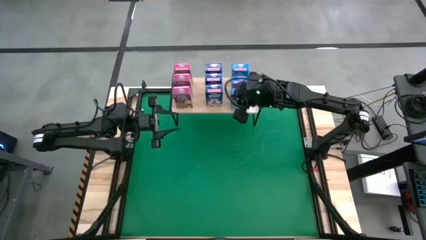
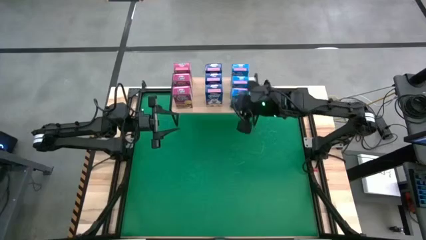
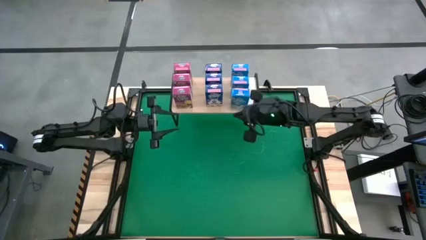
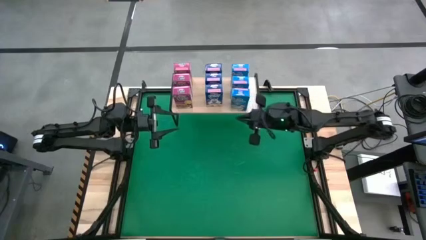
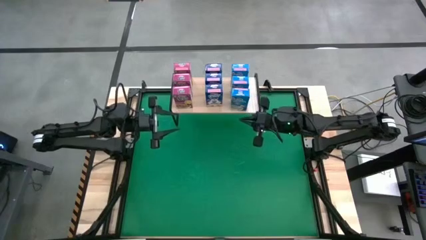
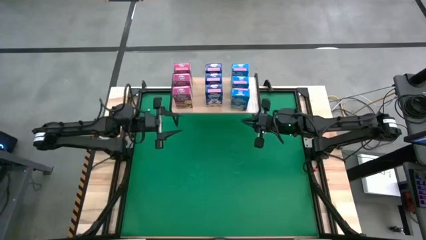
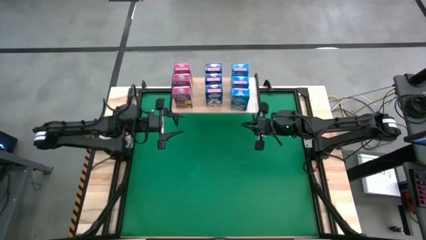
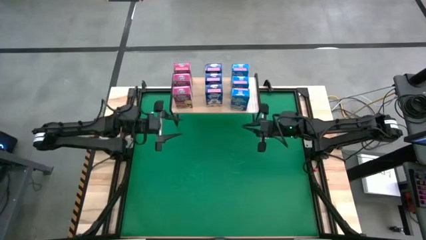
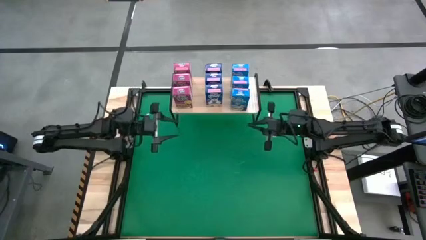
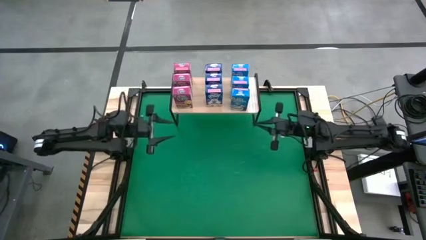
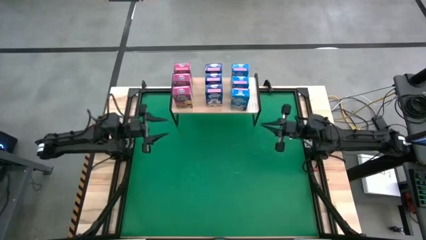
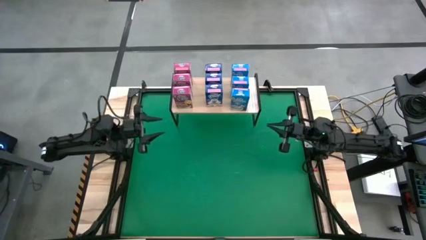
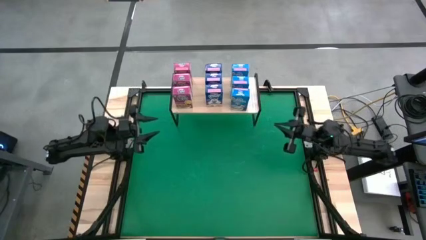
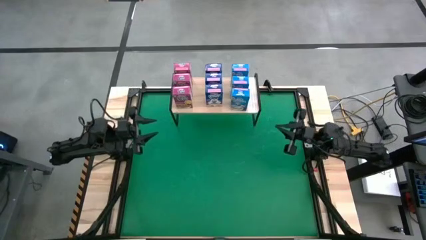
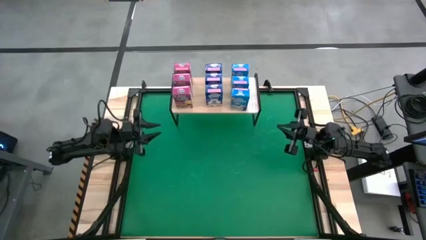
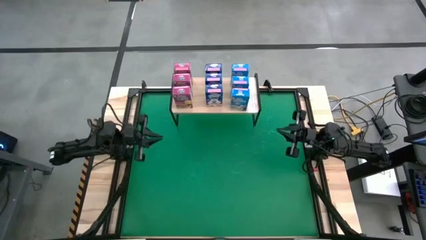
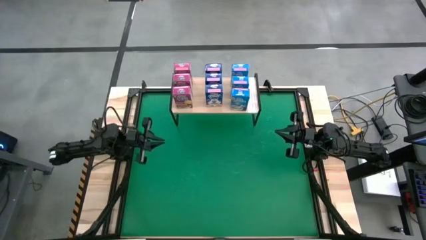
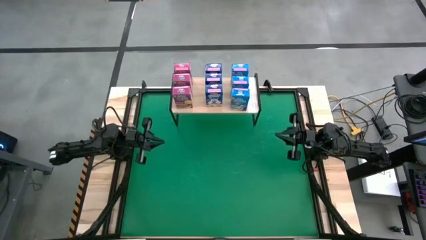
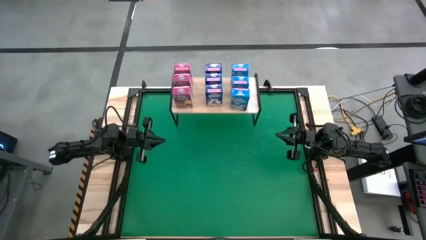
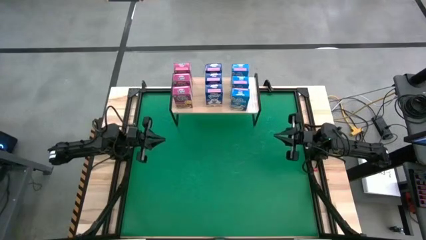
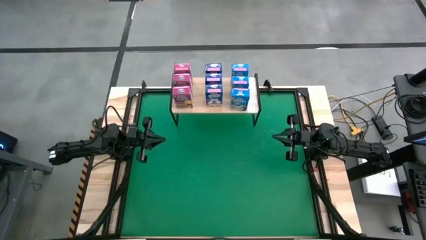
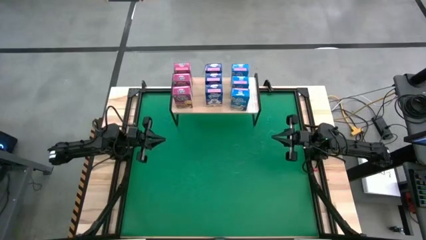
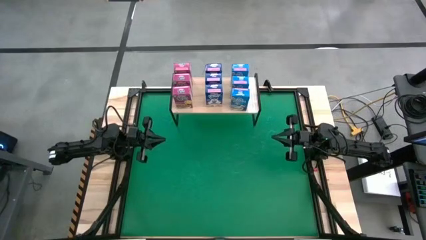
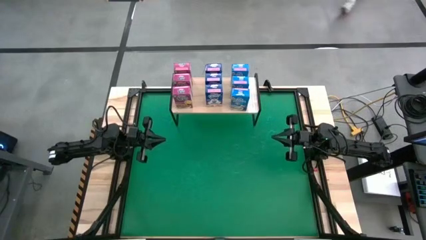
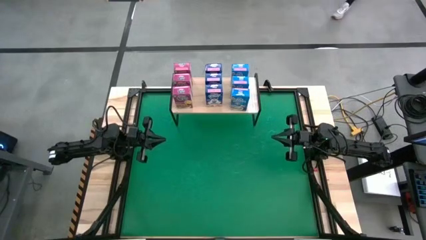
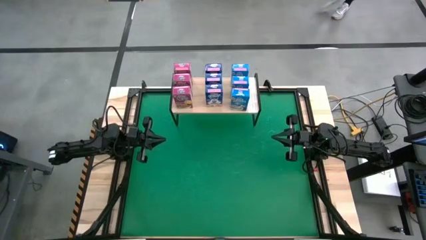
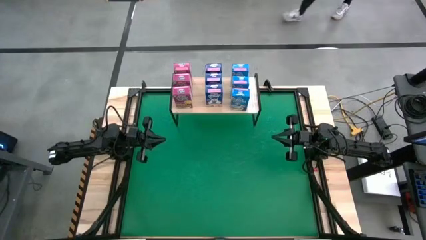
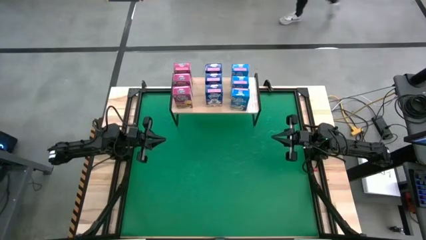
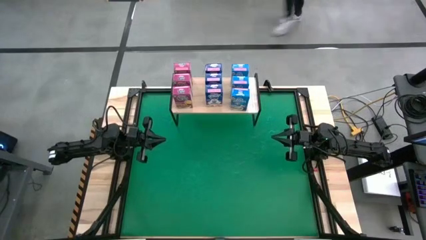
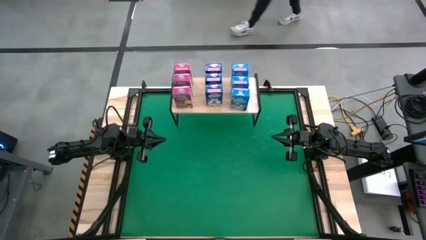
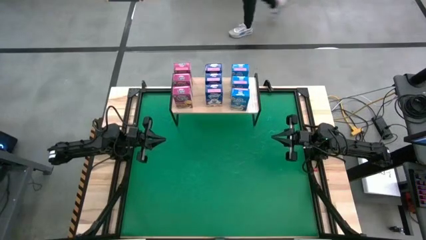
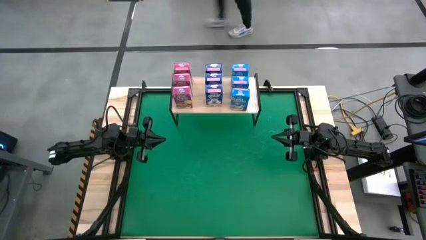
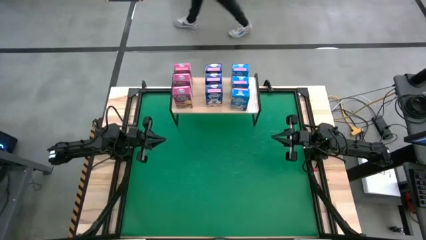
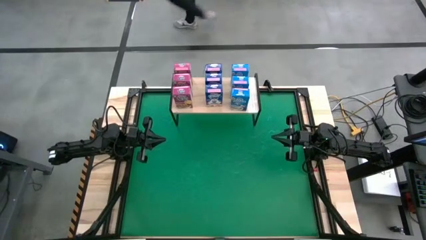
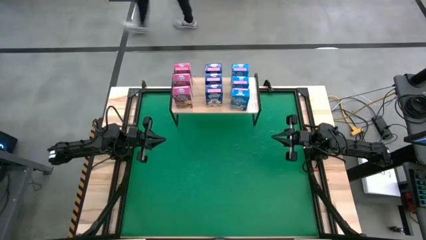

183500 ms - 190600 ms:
Task: Stack cereal on shelf
Return to Home Position

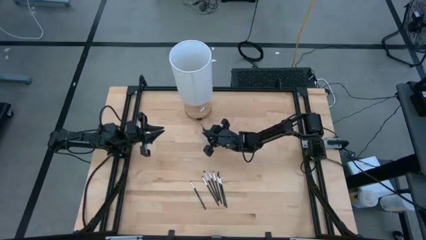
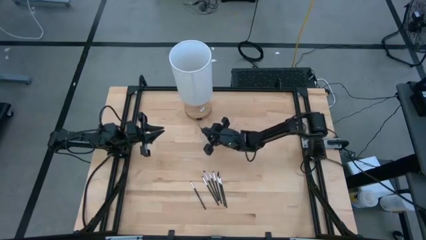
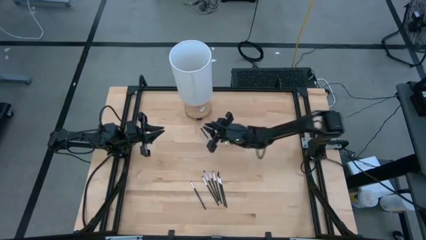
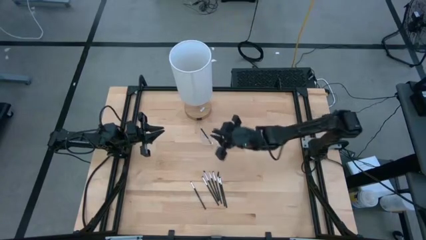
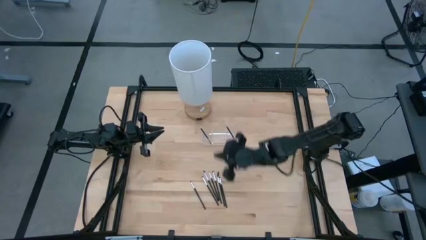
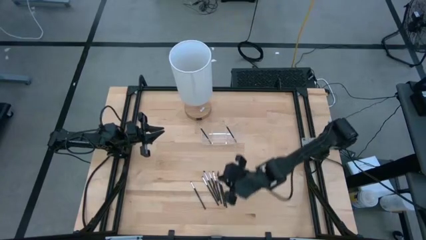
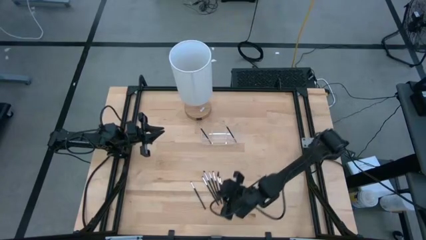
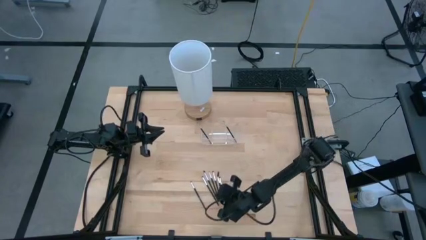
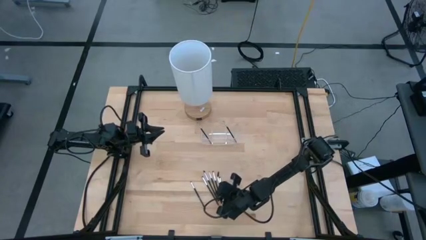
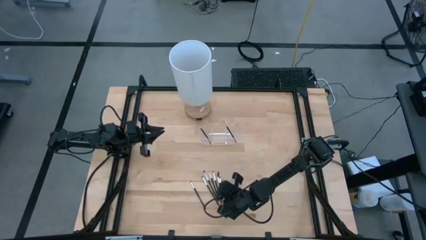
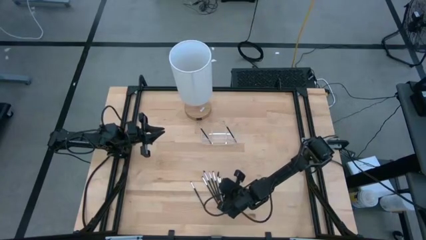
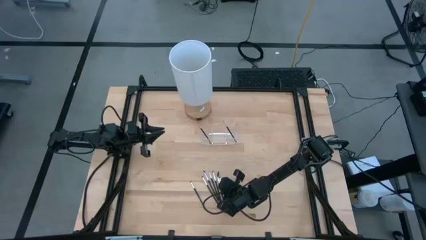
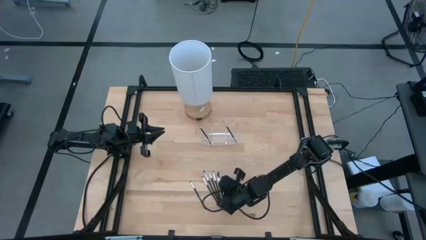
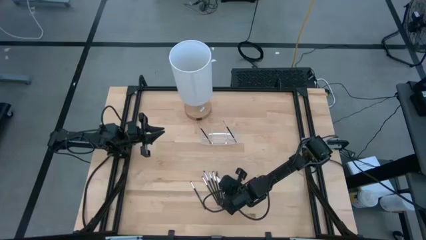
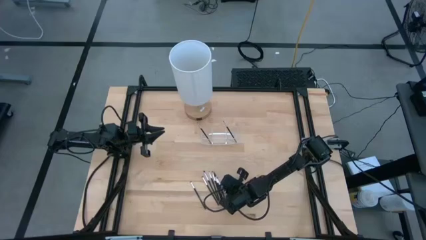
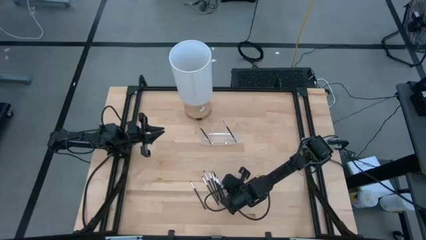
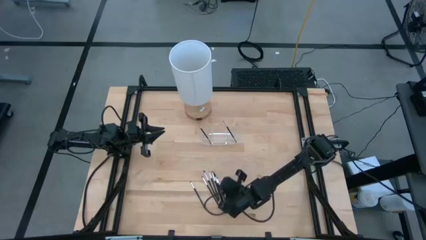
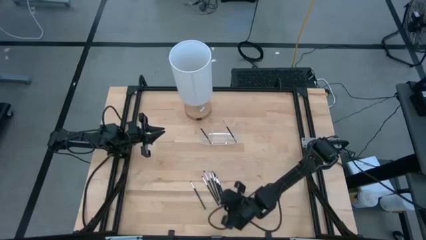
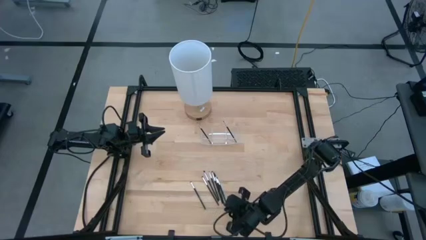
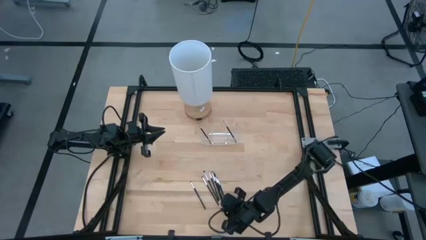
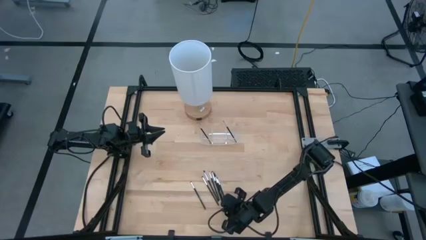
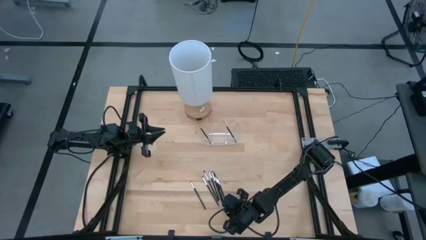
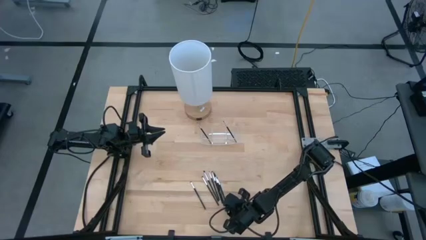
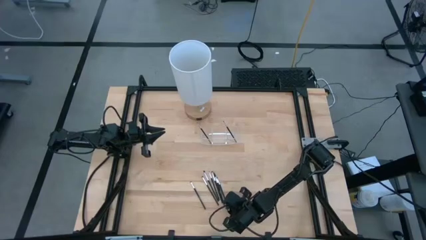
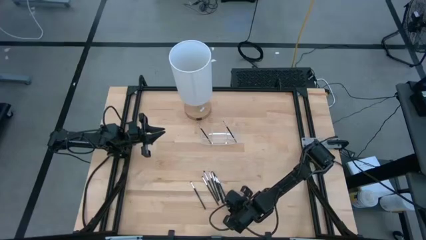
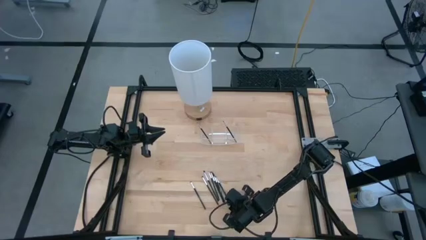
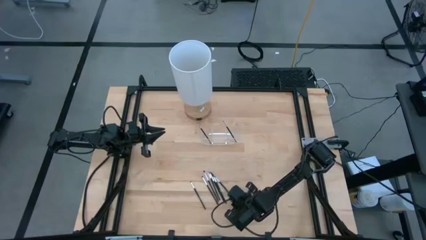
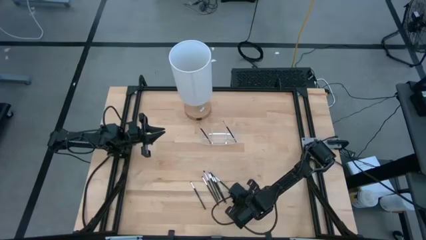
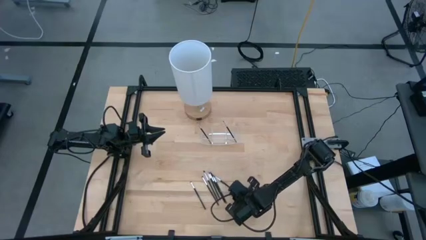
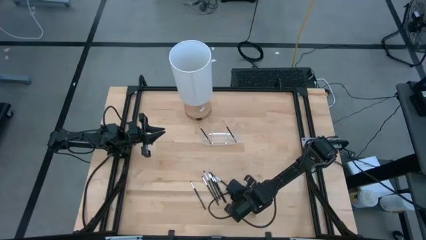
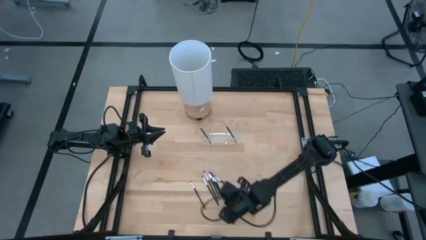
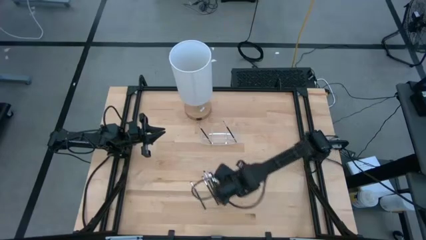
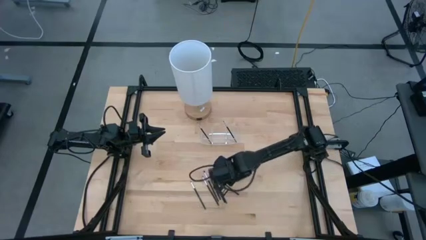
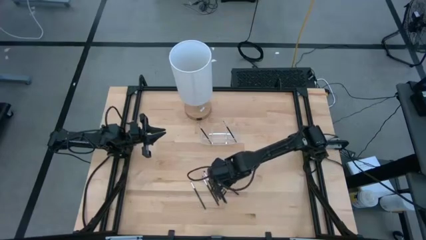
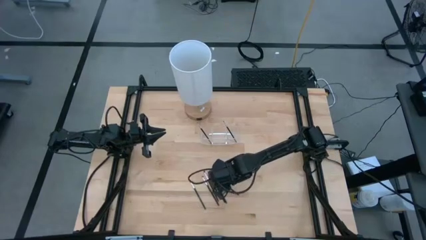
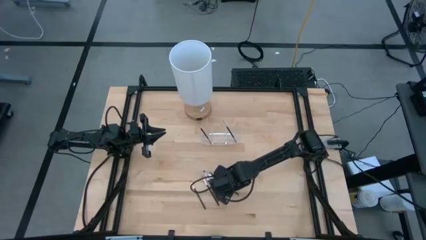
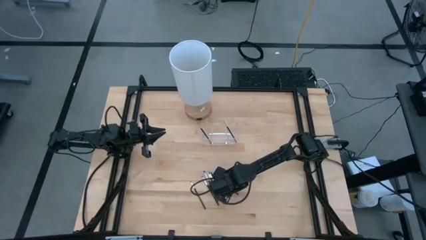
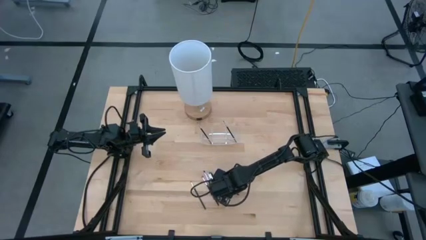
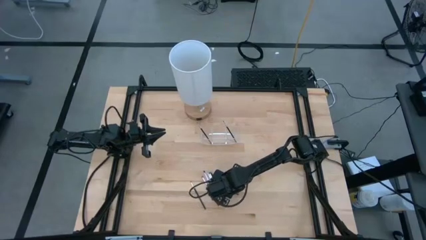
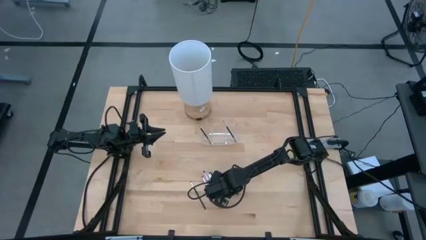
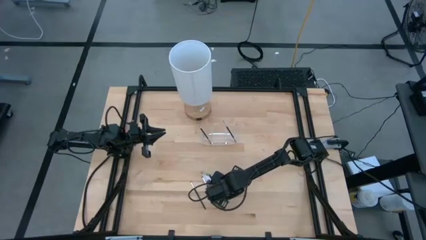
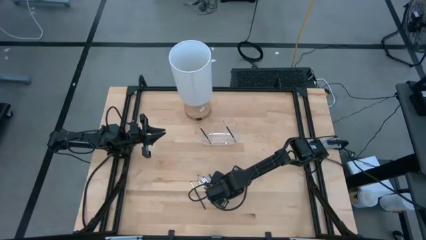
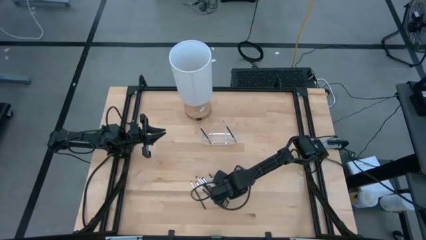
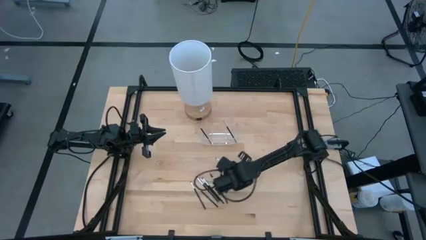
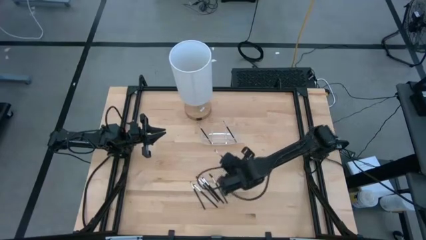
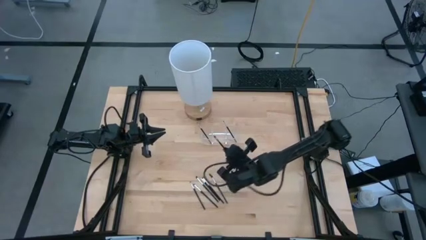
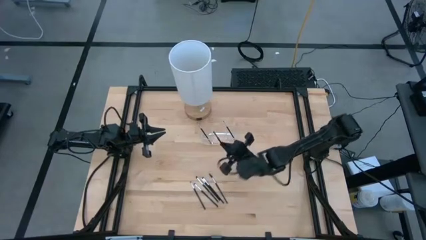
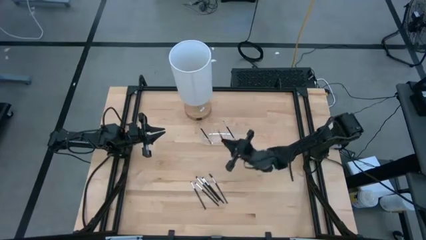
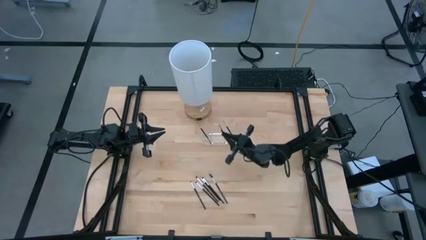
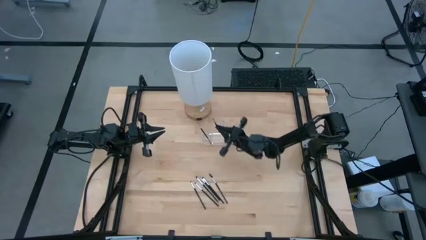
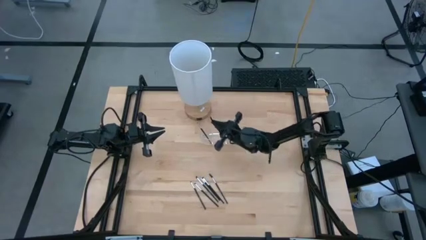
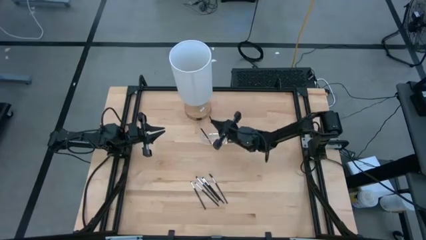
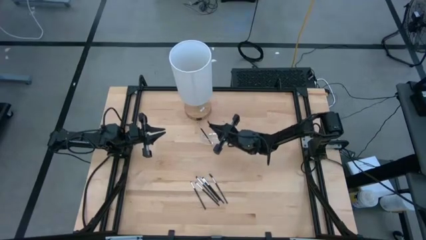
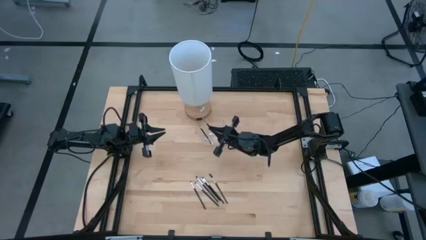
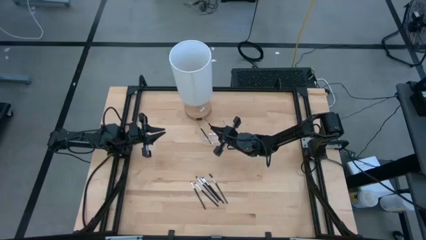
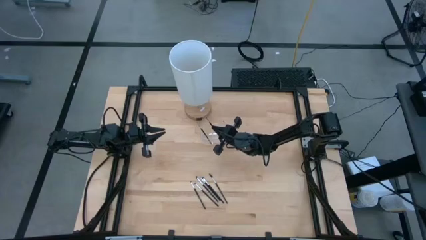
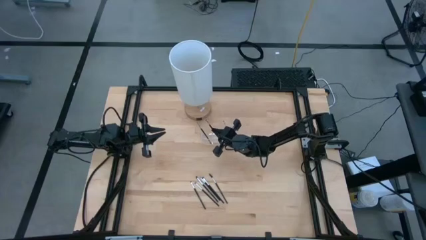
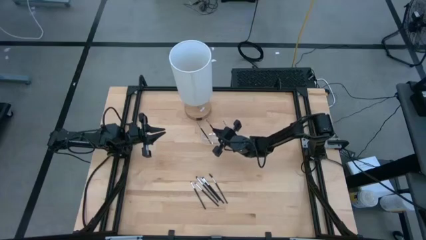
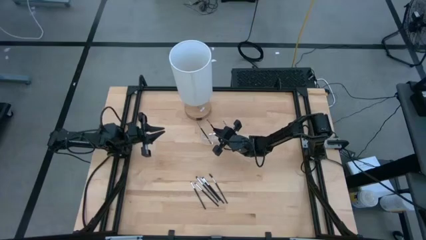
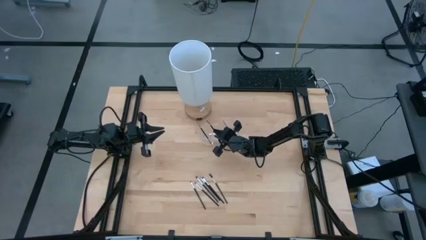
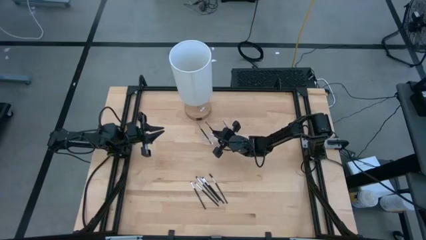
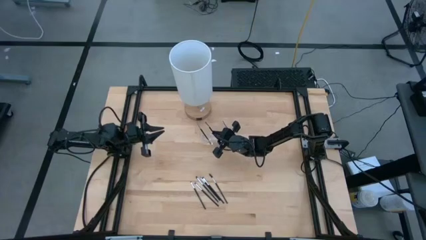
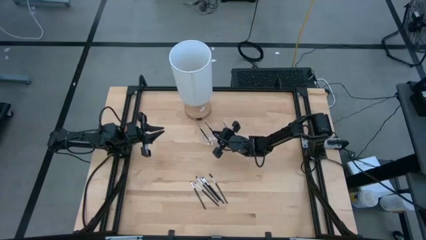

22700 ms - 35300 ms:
Task: Pick & Place Makeup Supplies
Put the makeup brush into the transparent organizer
